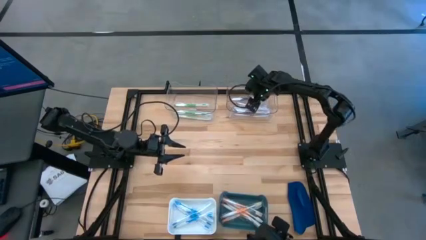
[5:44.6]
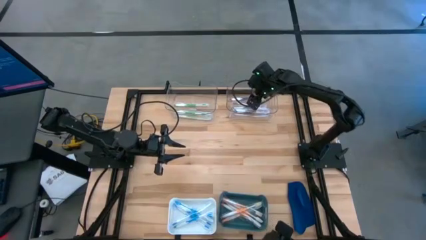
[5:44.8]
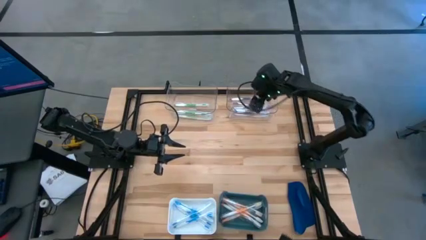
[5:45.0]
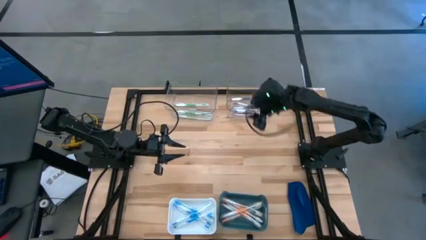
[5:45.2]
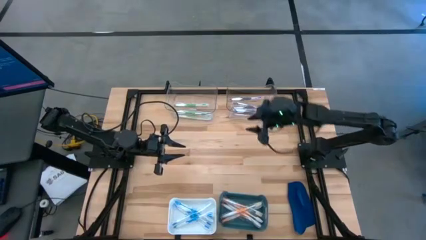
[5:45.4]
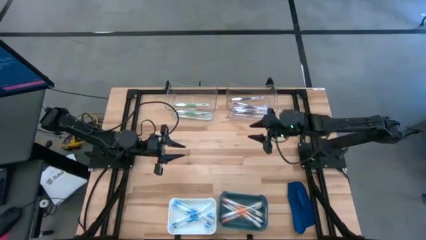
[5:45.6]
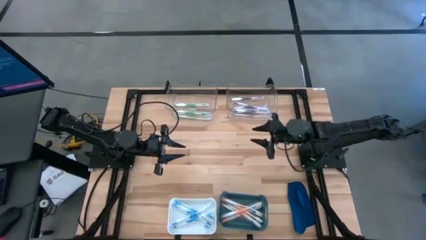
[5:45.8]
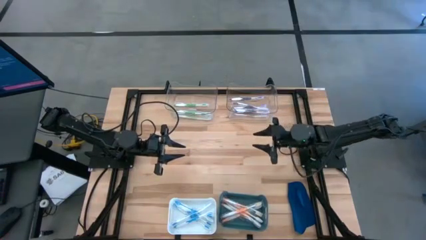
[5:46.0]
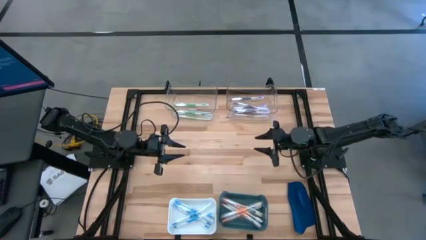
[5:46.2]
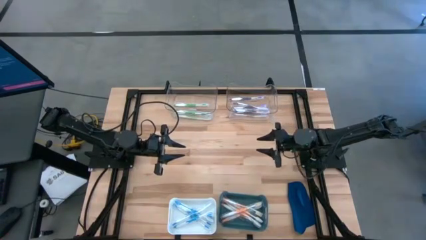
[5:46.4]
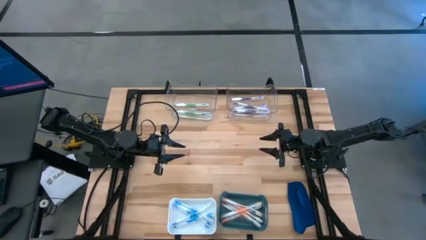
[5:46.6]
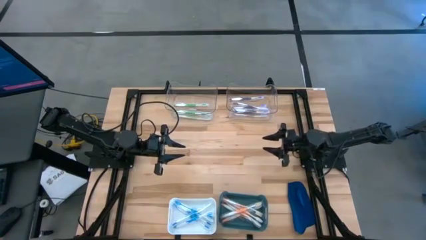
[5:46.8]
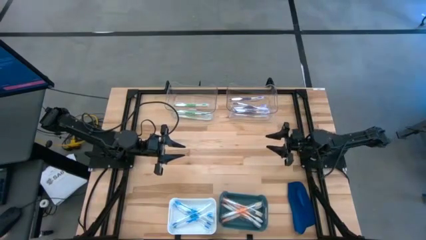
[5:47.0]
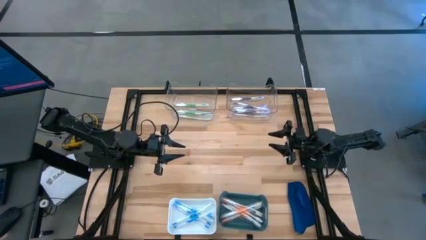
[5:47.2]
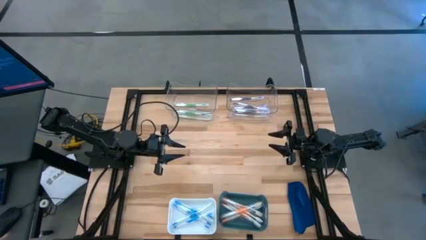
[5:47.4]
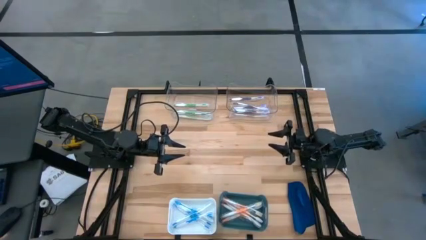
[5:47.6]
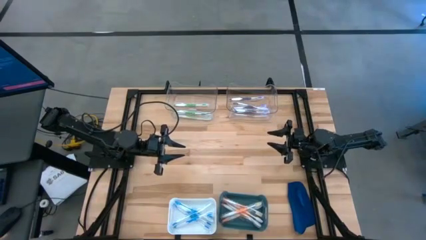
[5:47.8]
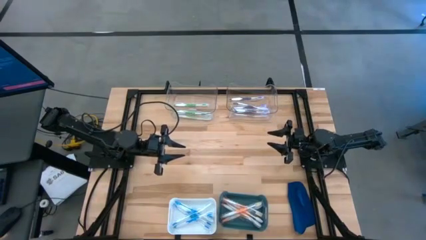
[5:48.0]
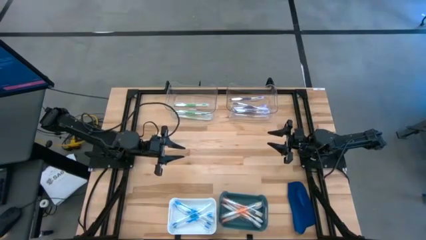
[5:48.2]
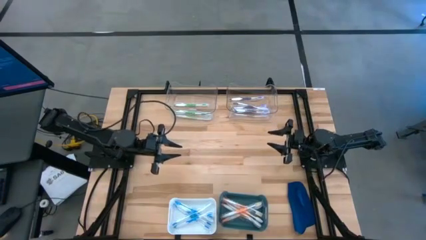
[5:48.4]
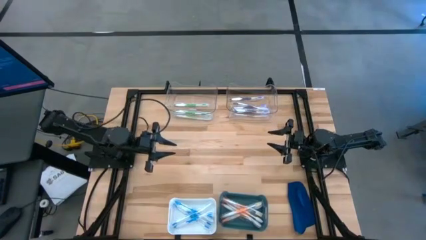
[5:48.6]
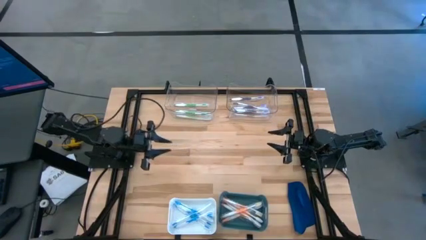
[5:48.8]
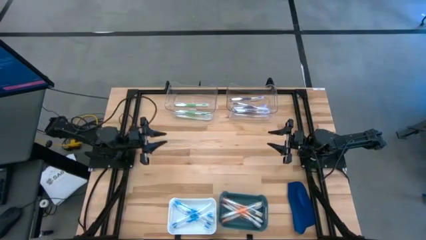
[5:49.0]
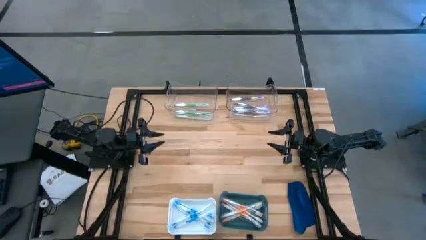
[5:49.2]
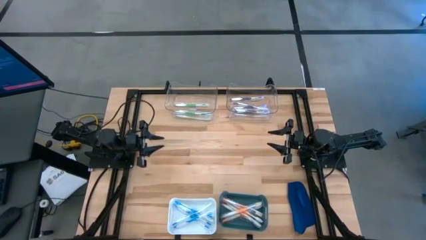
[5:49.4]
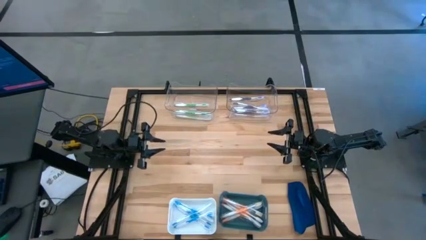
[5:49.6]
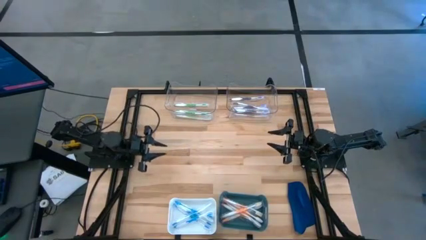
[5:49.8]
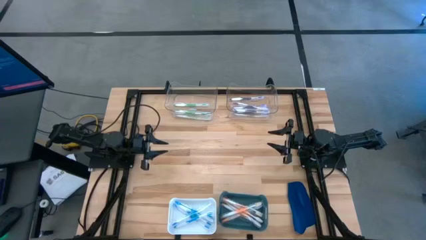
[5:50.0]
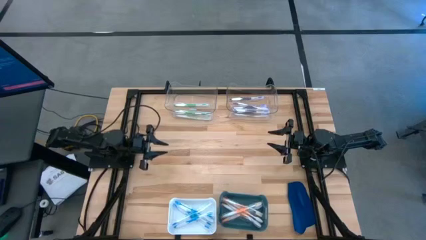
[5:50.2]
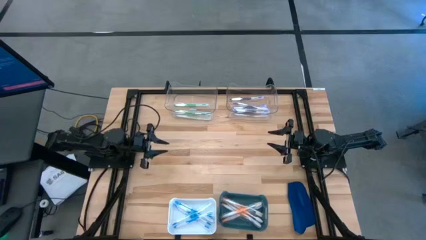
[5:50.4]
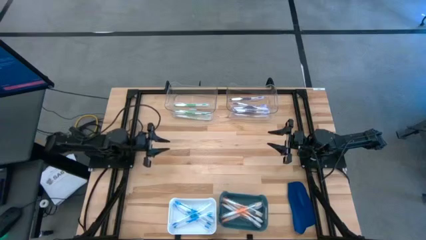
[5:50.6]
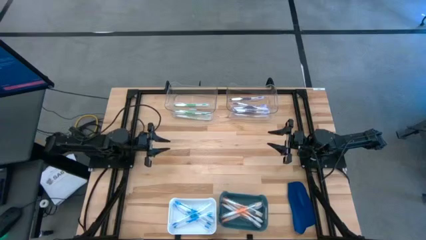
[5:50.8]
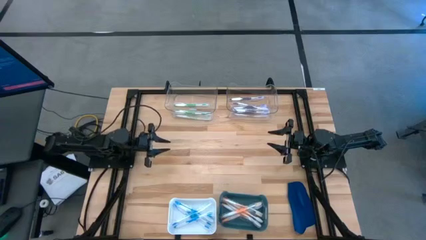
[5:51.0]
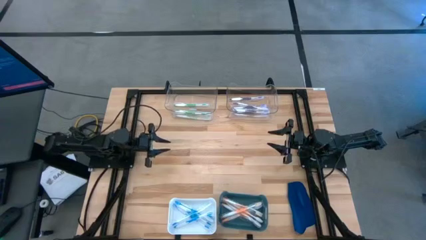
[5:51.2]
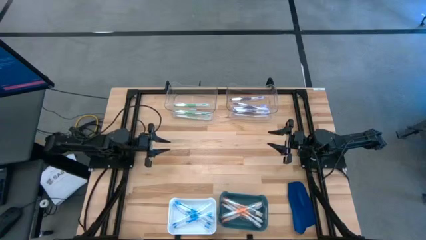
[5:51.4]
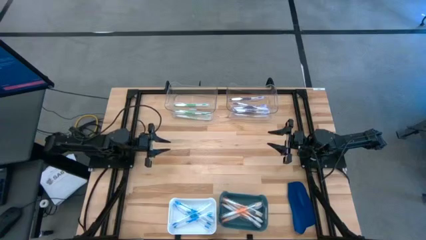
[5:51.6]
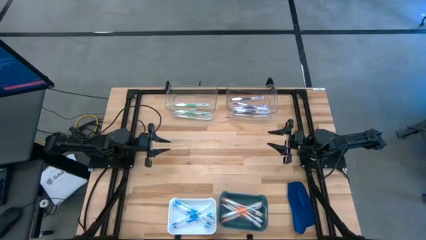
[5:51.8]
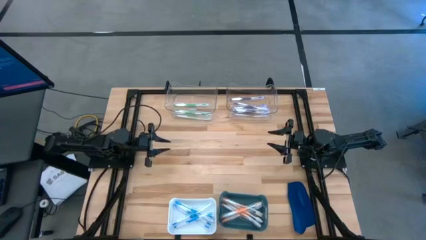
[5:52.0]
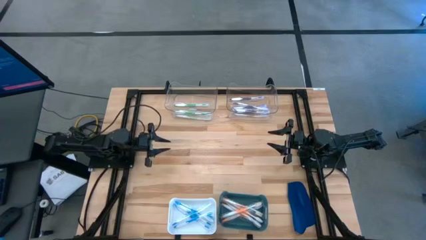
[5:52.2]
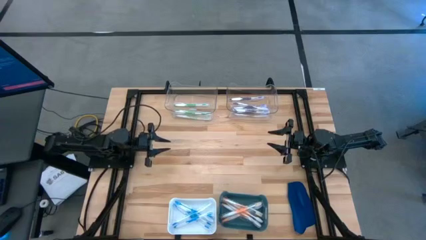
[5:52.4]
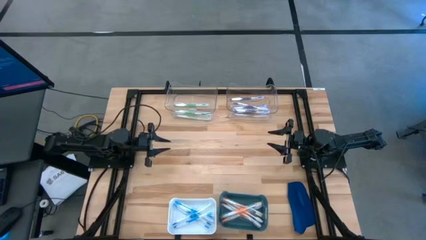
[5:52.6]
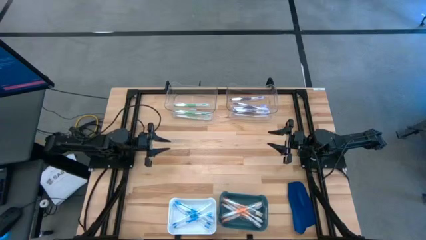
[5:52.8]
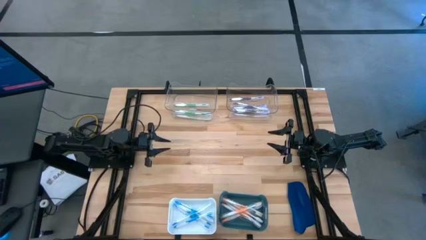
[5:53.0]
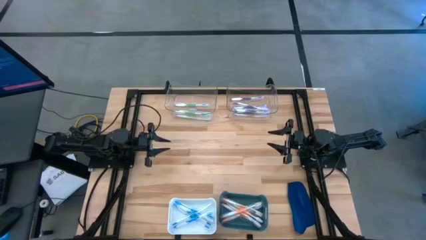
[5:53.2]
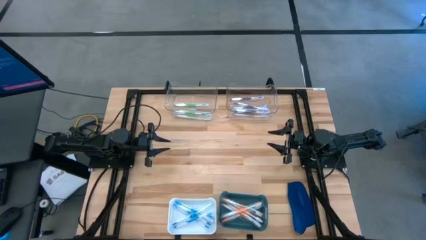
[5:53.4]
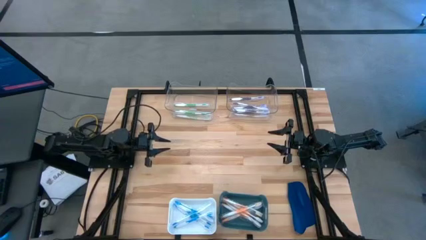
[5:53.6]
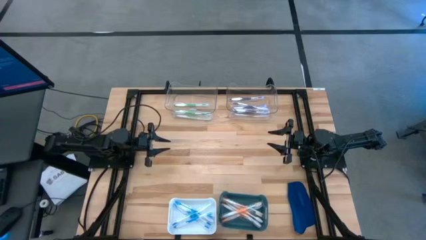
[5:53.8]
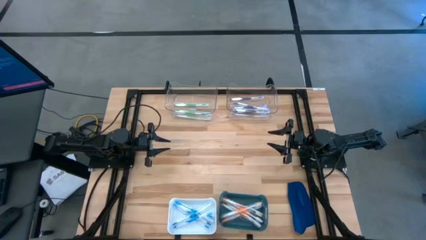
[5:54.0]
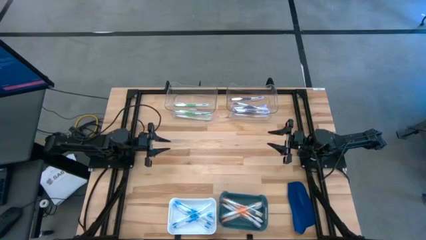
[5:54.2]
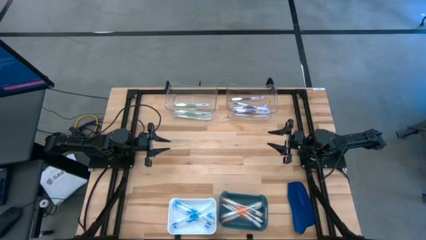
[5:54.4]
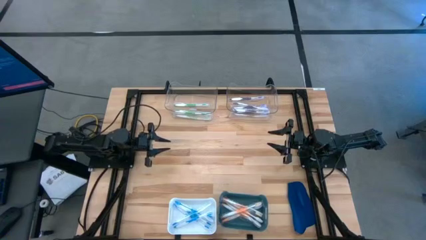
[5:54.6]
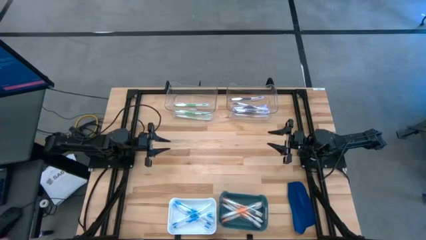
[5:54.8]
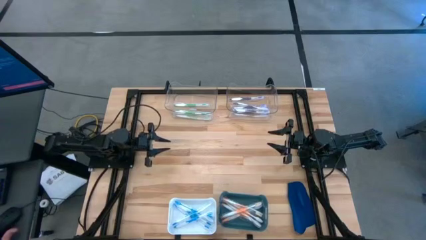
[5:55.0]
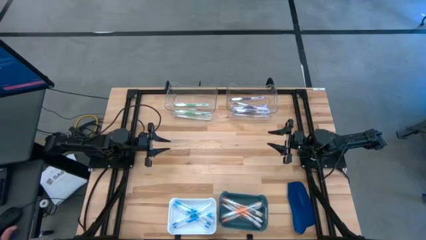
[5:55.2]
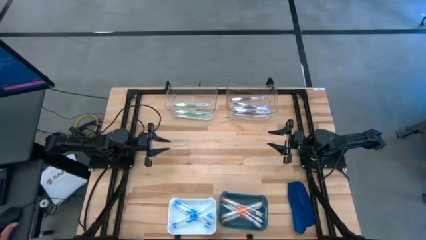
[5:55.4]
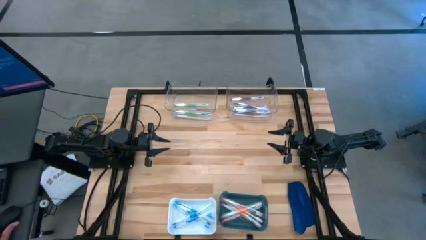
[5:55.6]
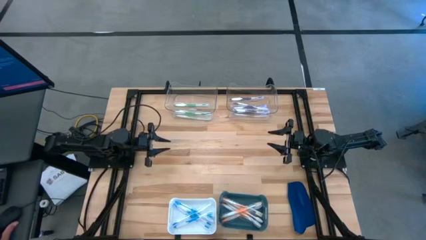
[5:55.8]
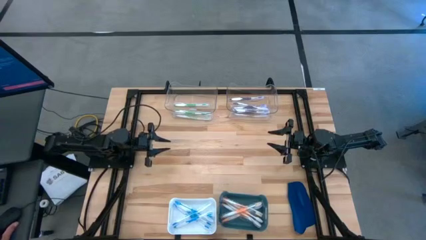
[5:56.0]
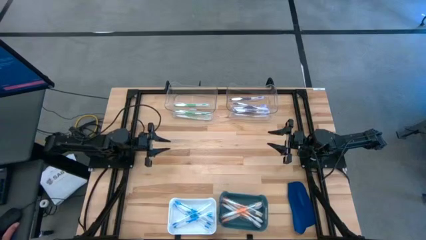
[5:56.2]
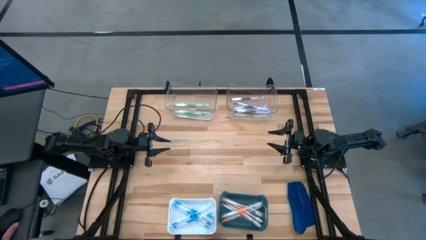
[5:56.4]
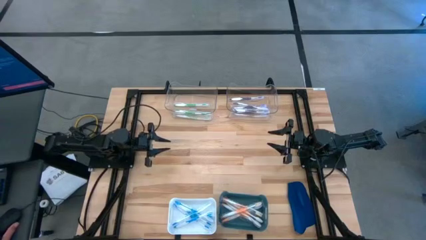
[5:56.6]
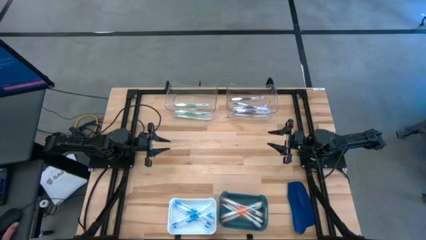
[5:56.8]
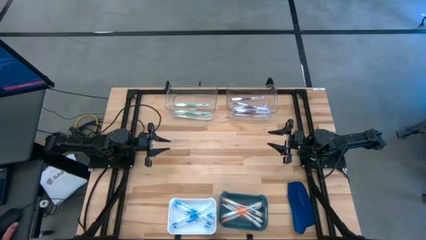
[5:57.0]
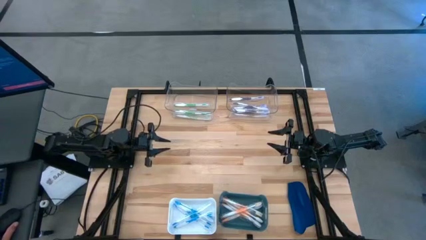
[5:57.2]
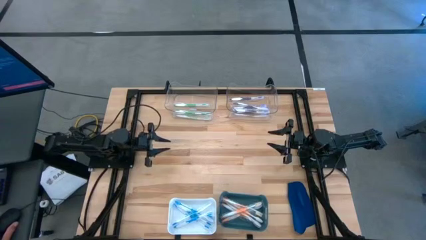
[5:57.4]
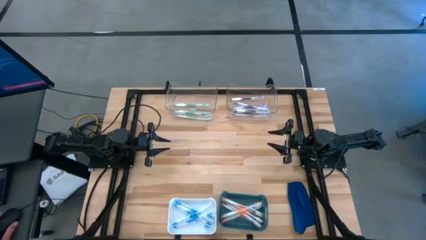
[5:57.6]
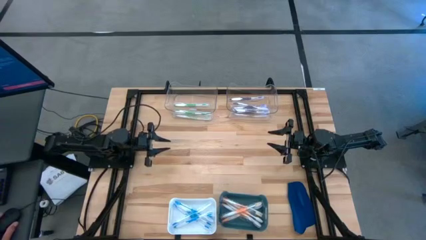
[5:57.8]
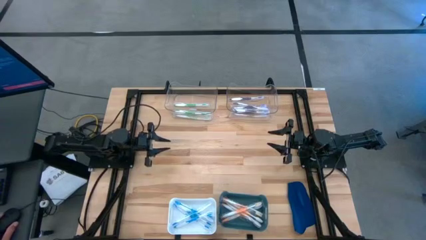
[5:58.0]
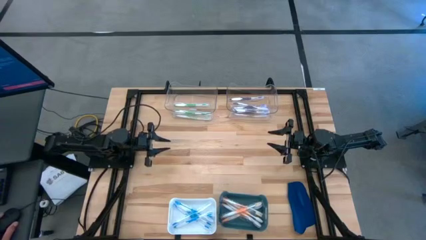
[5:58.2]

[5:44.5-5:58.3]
Task: Pick & Place Toothbrushes
Return to Home Position
